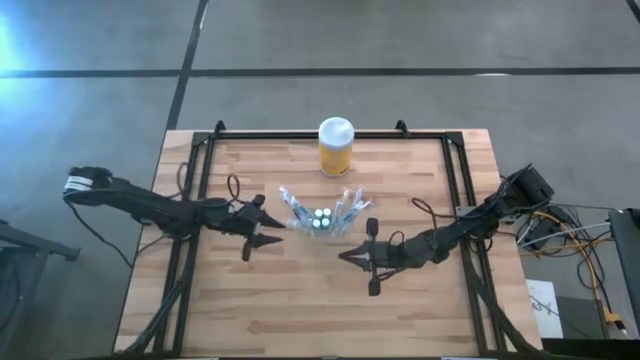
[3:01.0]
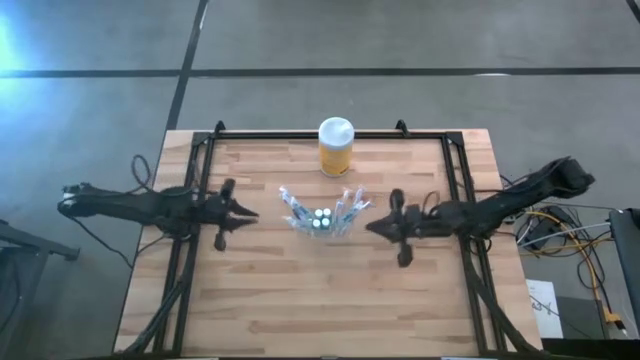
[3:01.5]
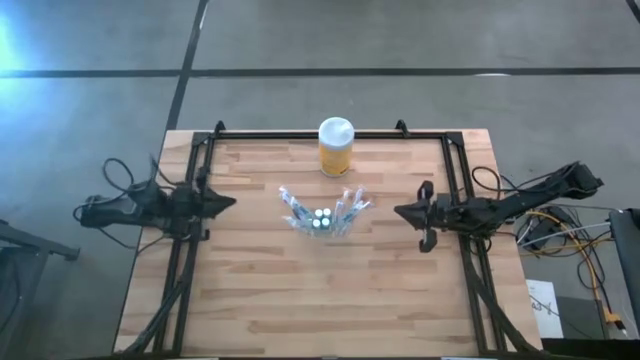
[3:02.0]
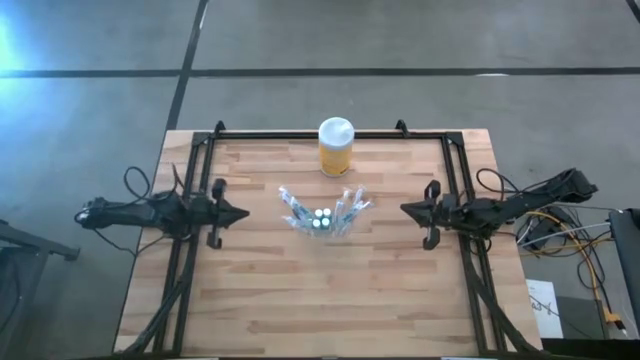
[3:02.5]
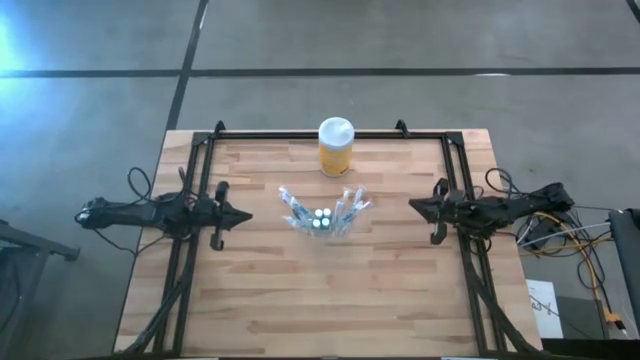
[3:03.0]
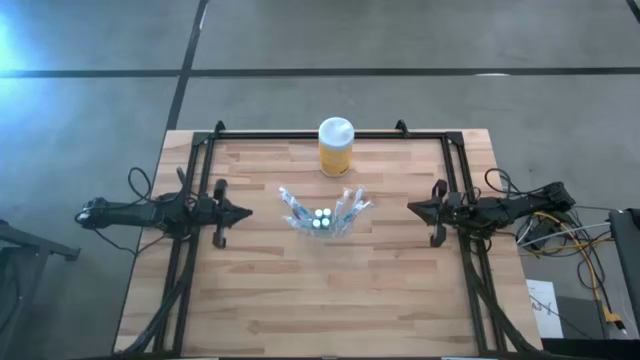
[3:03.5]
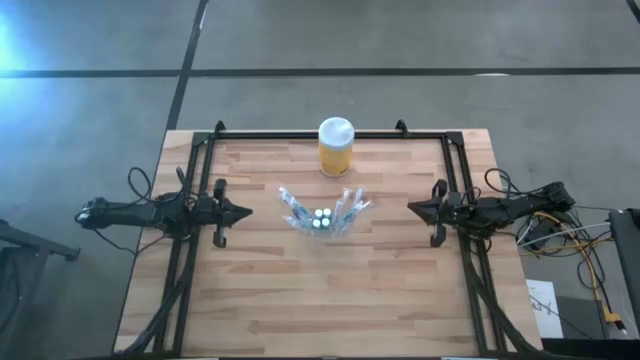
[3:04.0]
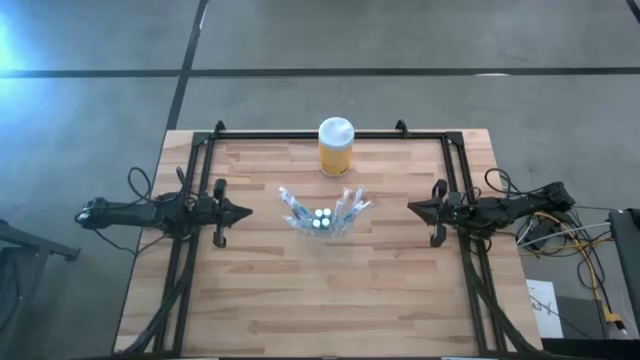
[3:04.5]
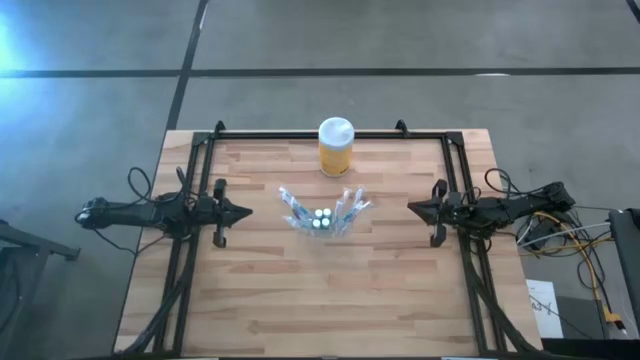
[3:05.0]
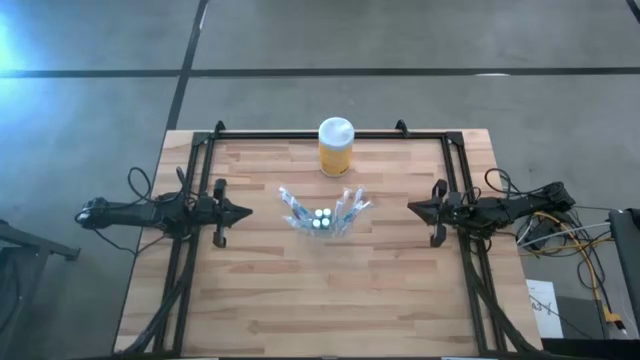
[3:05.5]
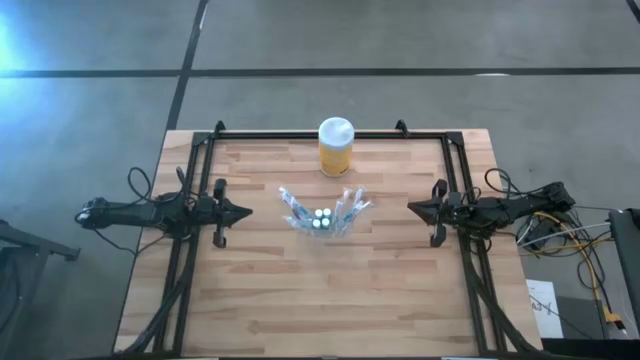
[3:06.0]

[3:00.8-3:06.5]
Task: Pick & Place toothbrushing station
Return to Home Position

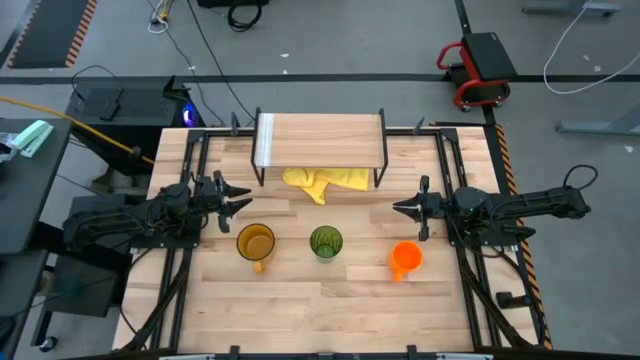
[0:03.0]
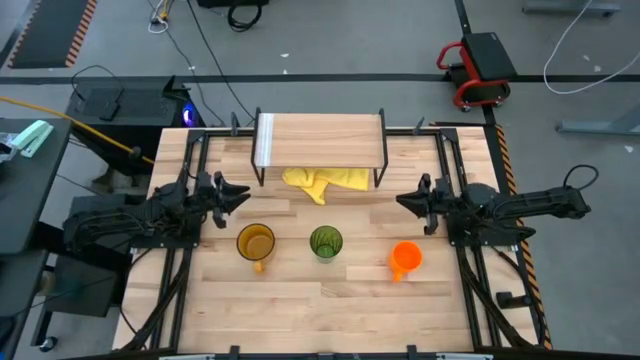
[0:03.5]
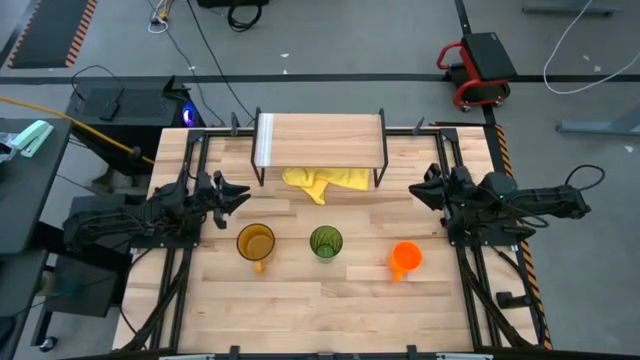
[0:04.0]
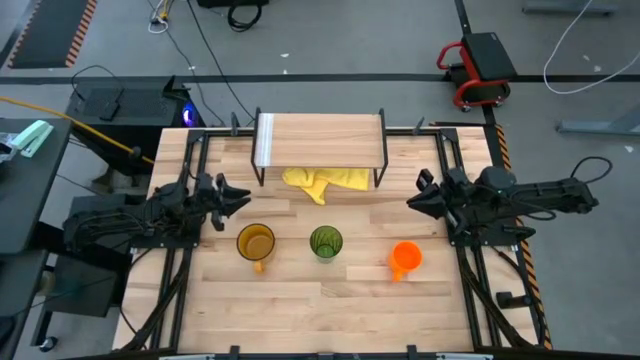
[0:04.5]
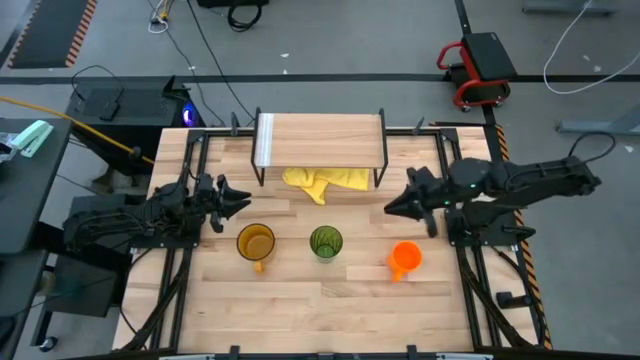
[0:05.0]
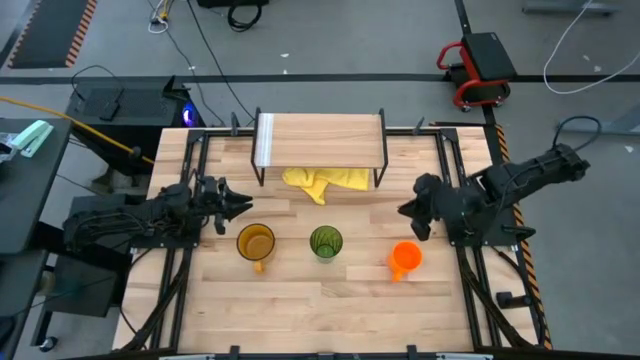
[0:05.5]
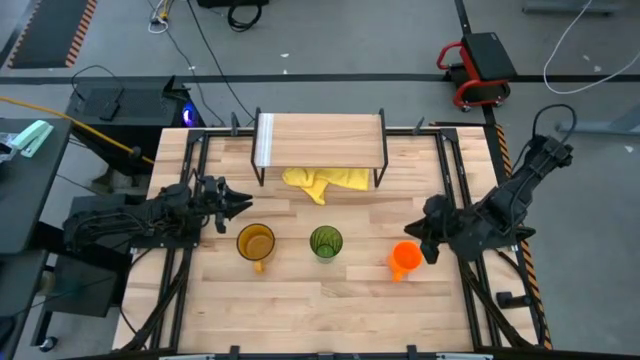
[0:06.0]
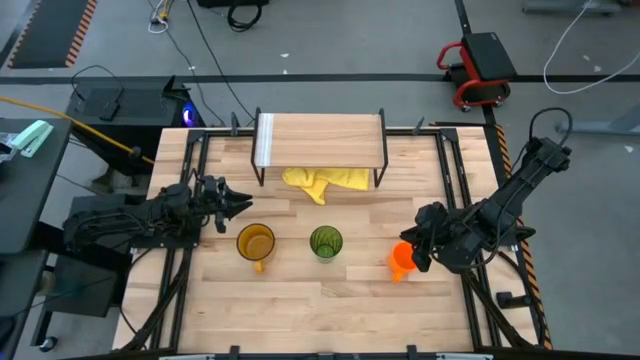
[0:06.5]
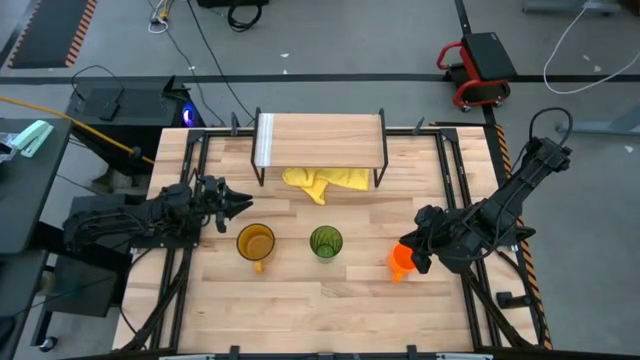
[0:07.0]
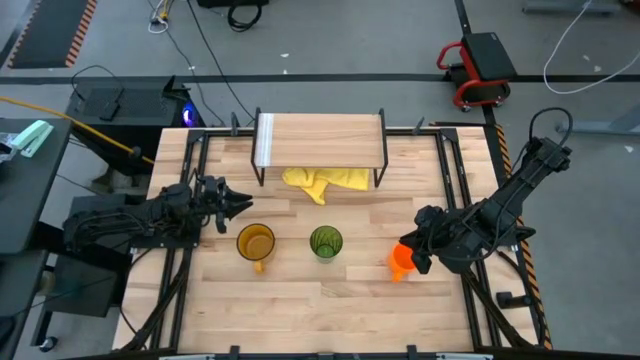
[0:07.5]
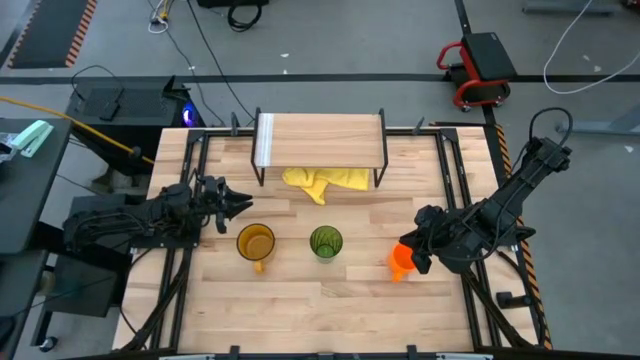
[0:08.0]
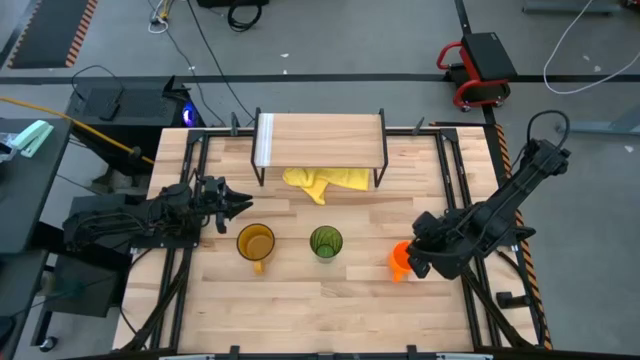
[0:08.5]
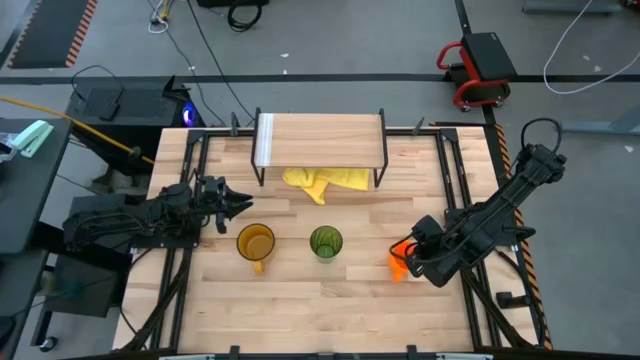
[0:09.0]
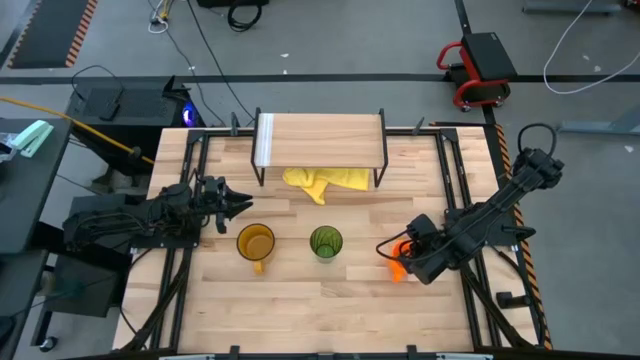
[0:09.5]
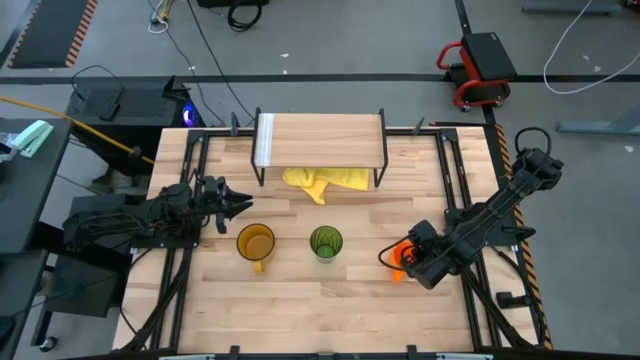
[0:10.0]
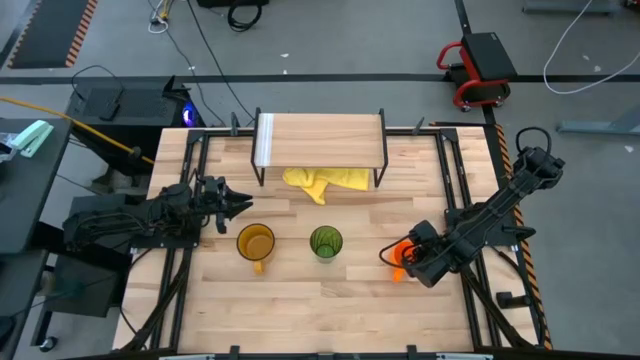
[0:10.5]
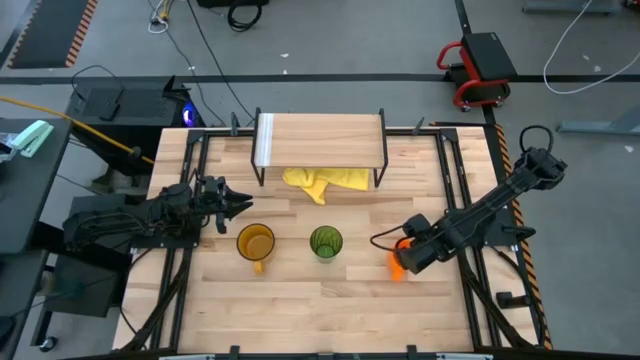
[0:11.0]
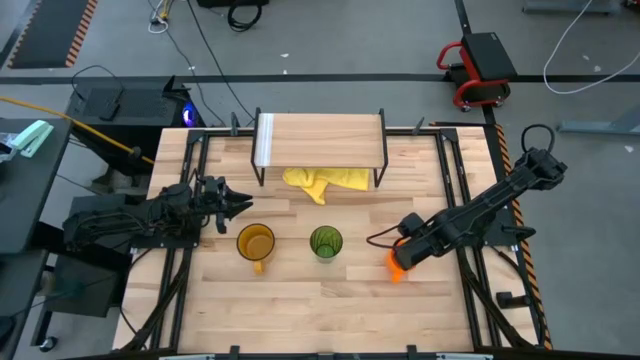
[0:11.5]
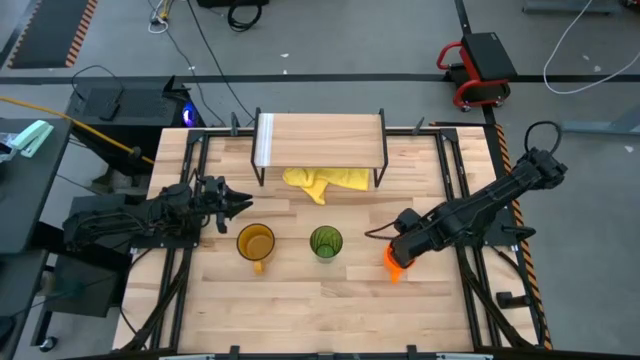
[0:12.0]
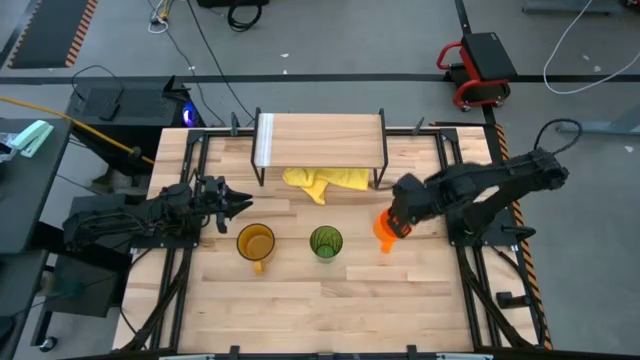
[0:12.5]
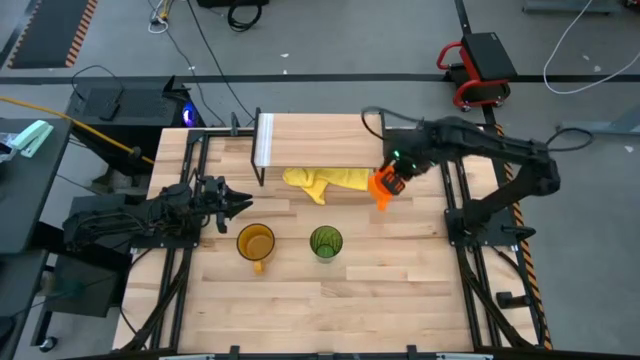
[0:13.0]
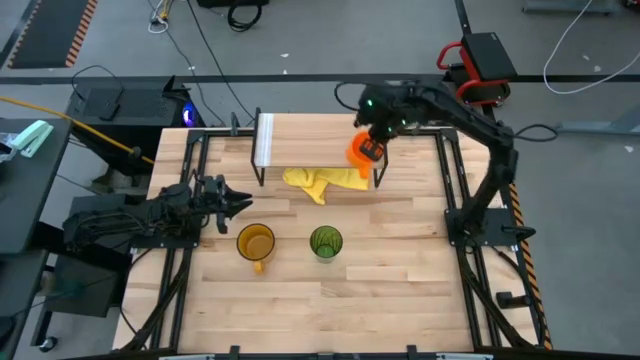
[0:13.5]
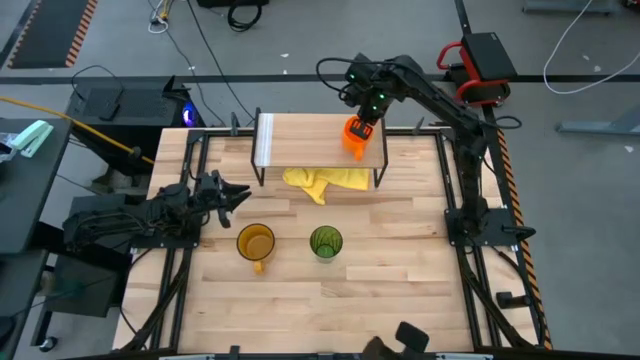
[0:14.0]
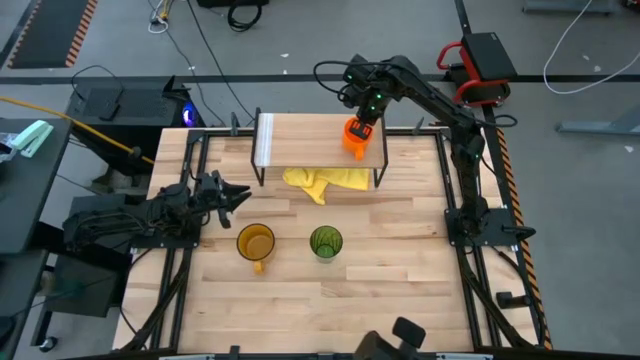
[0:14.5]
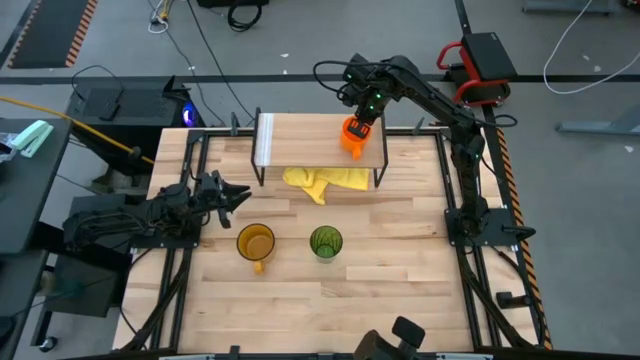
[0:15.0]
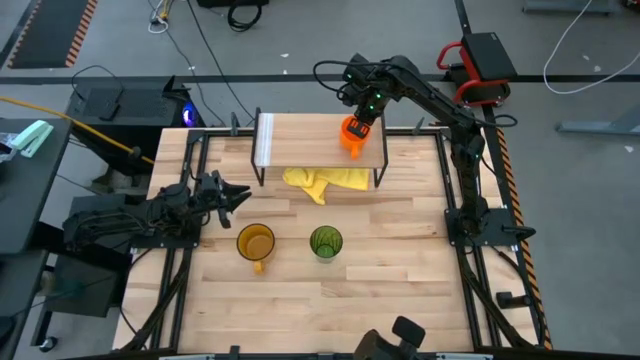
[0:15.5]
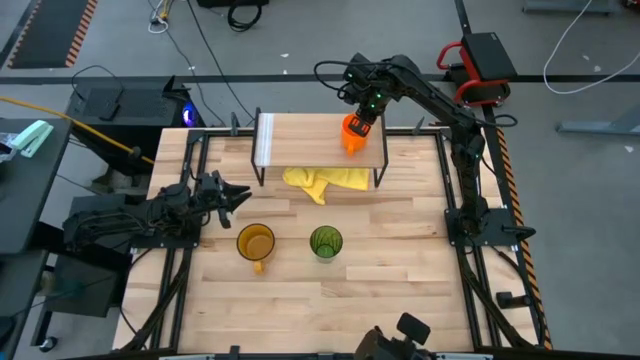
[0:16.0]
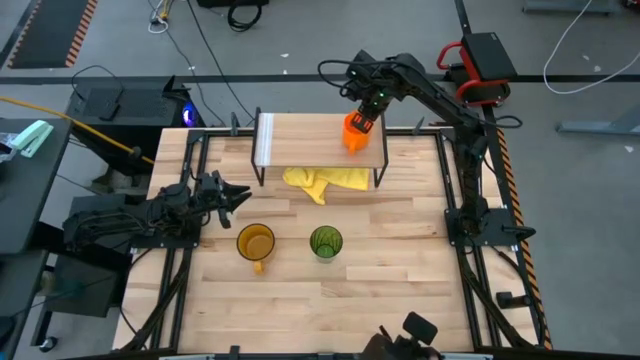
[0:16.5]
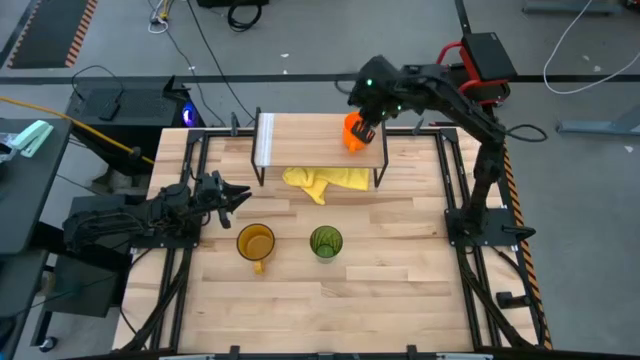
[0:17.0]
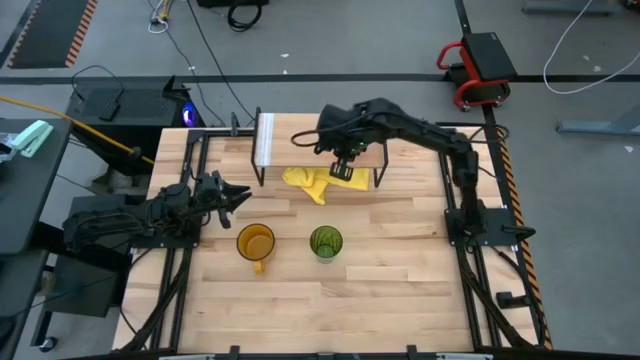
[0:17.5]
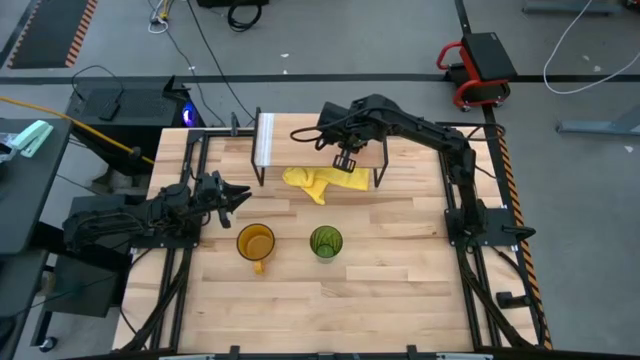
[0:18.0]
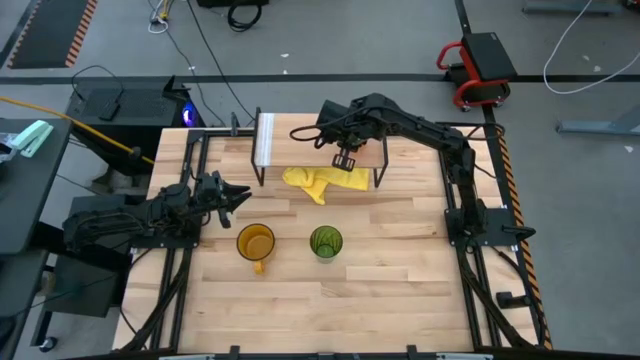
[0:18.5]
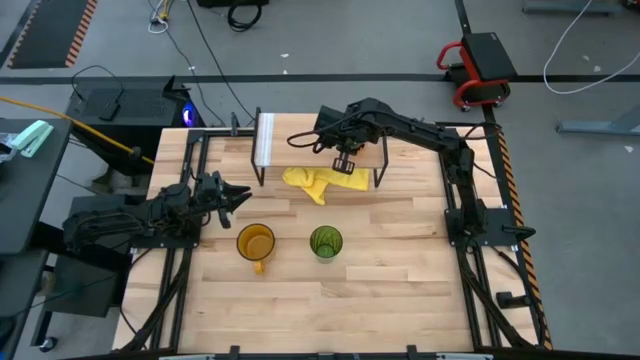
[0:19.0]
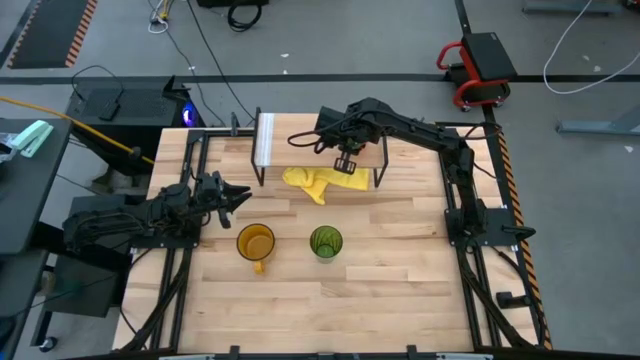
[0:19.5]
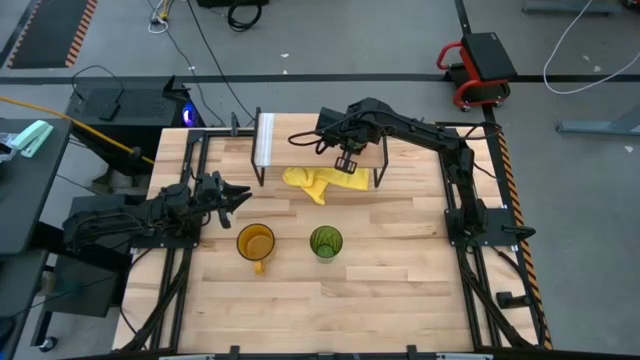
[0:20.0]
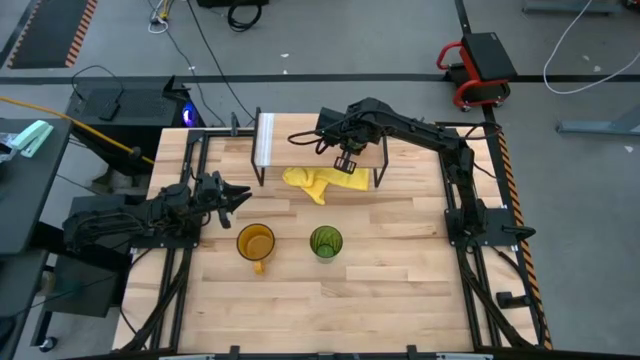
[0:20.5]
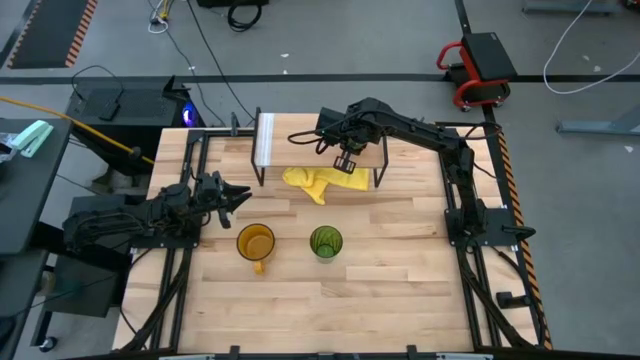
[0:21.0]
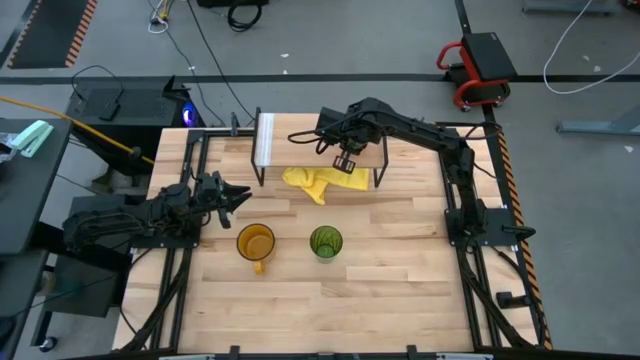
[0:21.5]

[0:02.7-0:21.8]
Task: Stack small to large cups/mugs on shelf
Put the orange mug on the shelf
